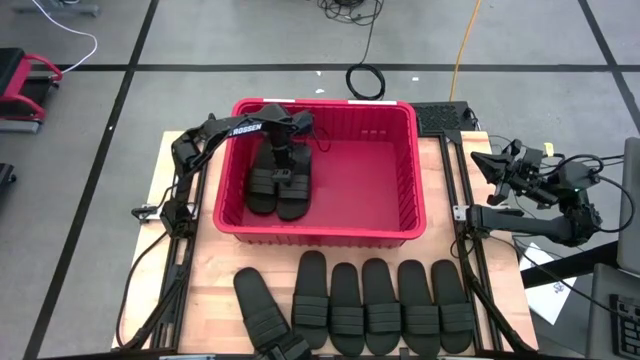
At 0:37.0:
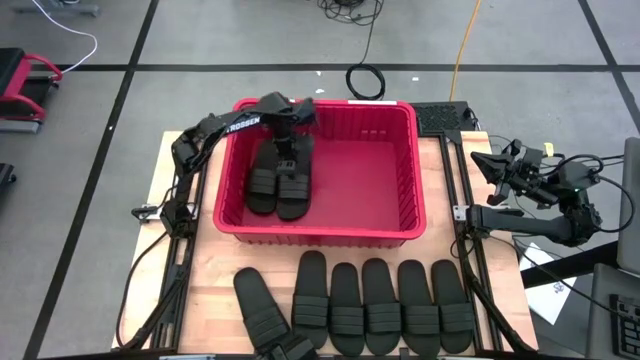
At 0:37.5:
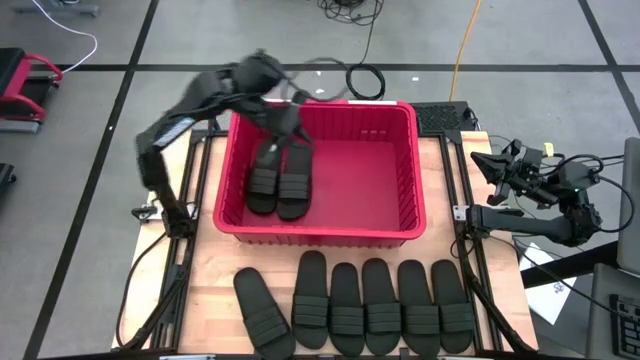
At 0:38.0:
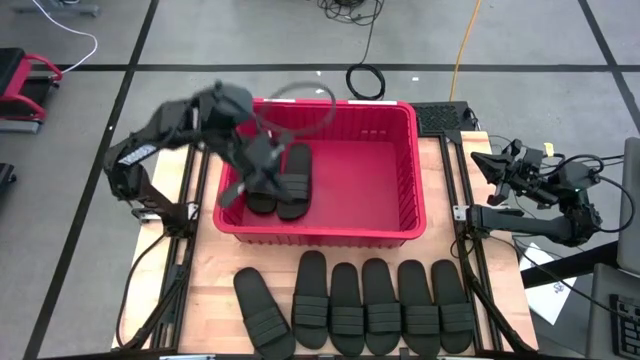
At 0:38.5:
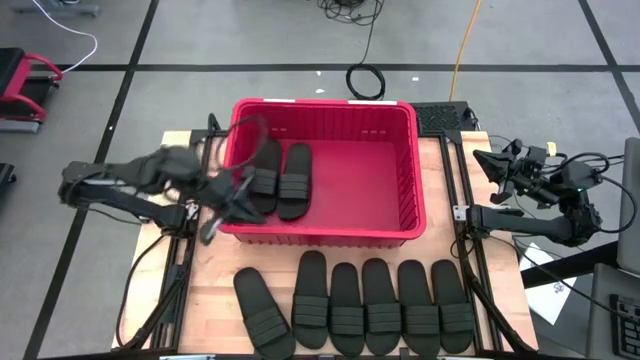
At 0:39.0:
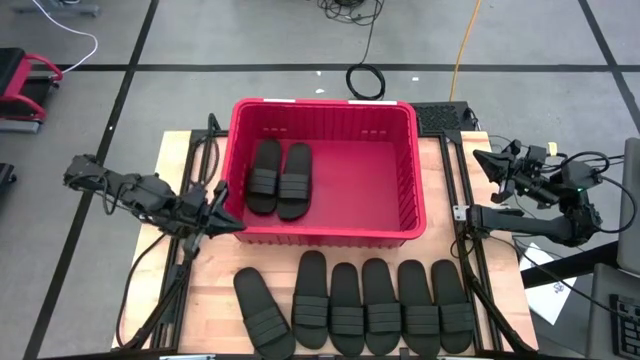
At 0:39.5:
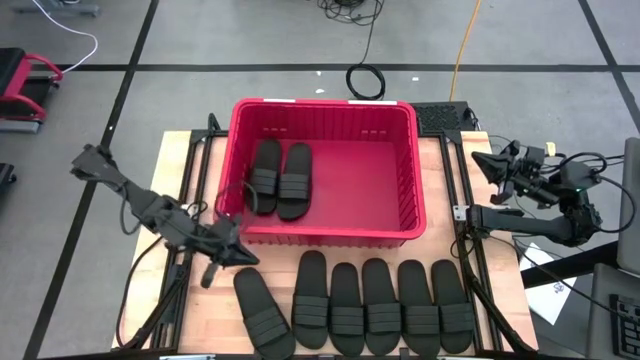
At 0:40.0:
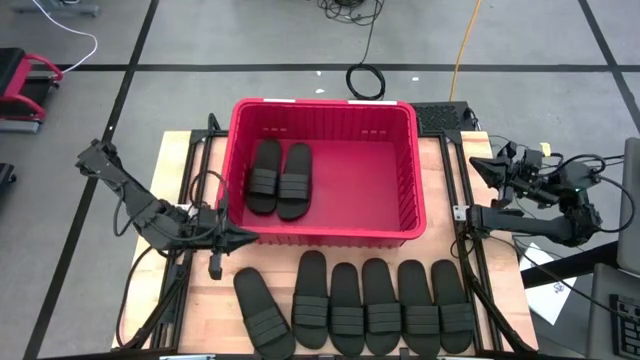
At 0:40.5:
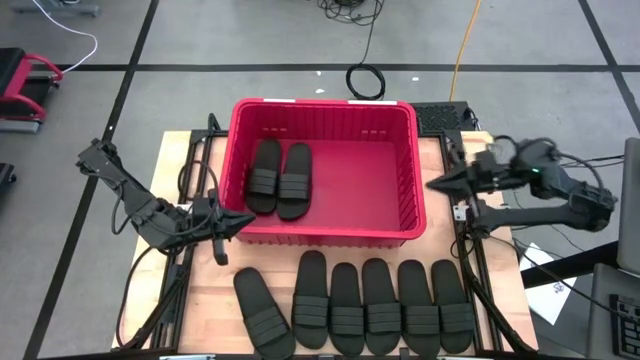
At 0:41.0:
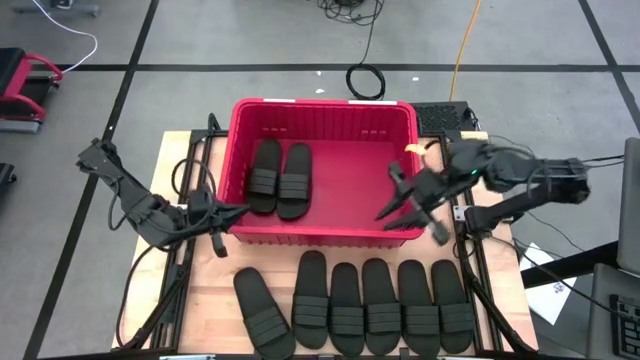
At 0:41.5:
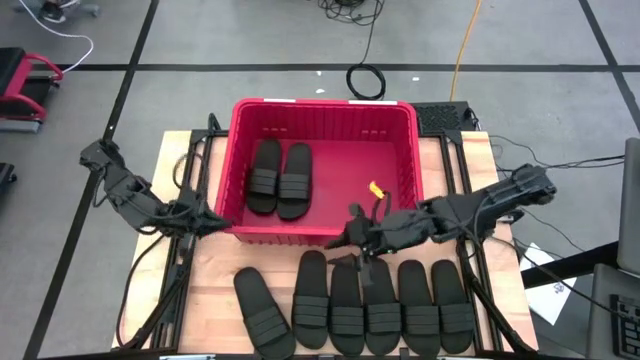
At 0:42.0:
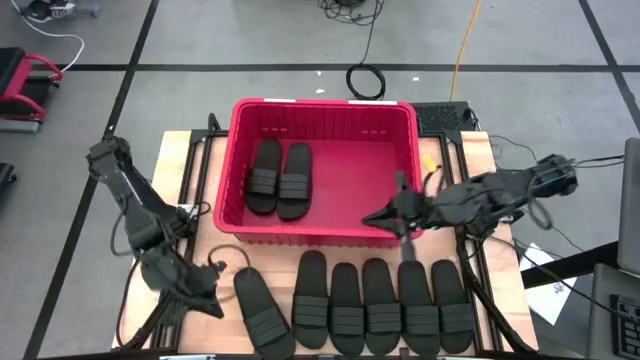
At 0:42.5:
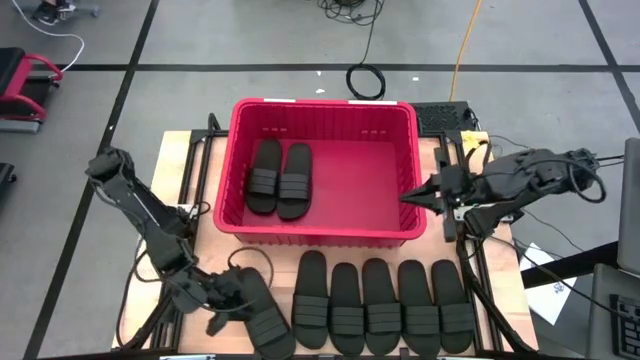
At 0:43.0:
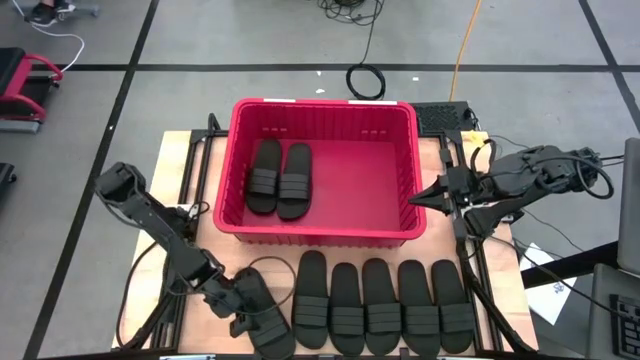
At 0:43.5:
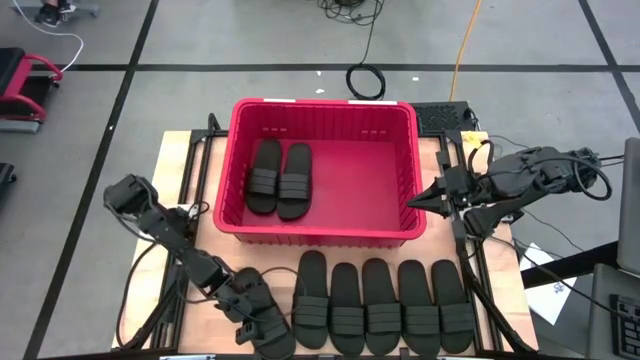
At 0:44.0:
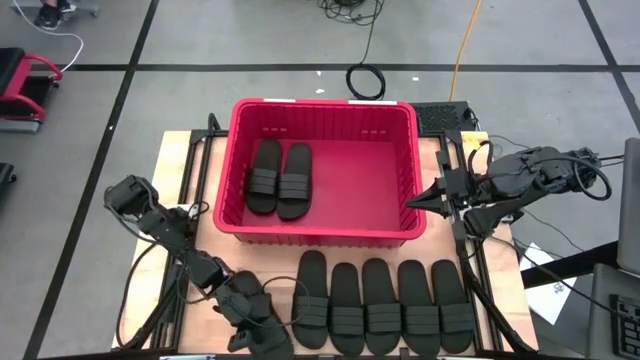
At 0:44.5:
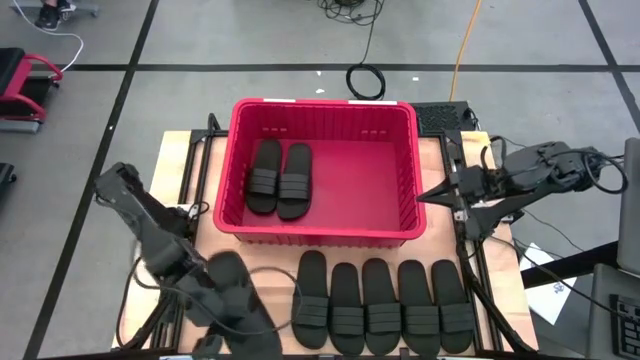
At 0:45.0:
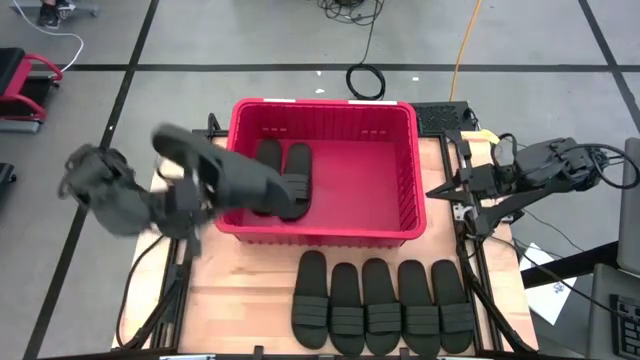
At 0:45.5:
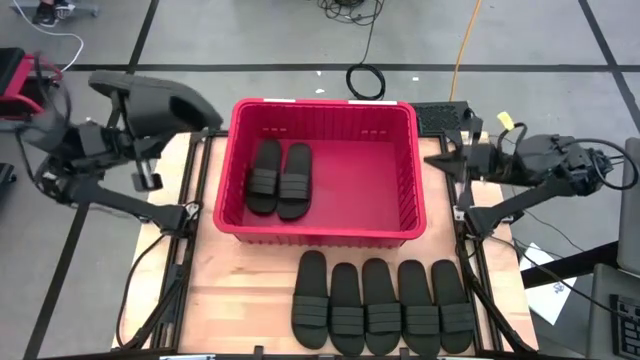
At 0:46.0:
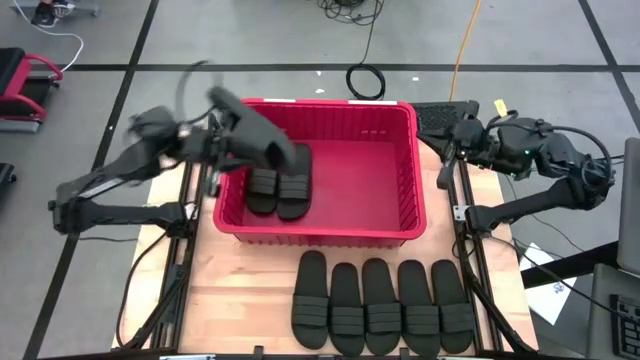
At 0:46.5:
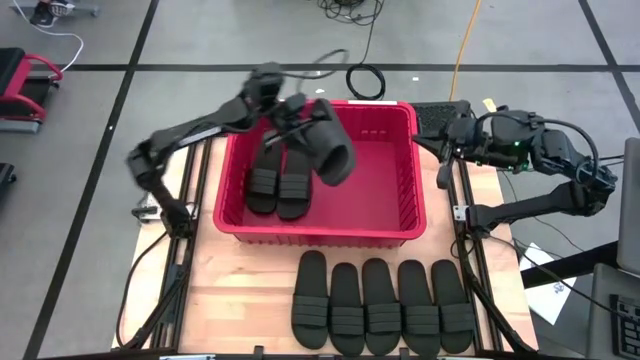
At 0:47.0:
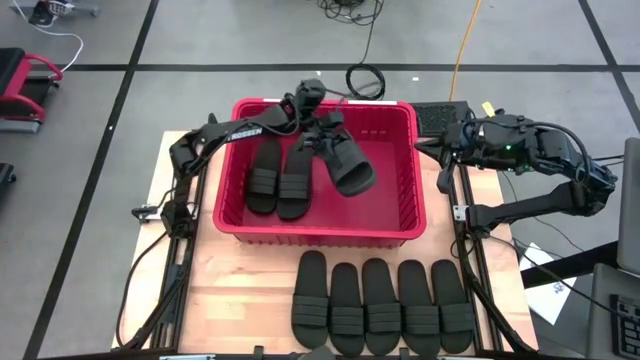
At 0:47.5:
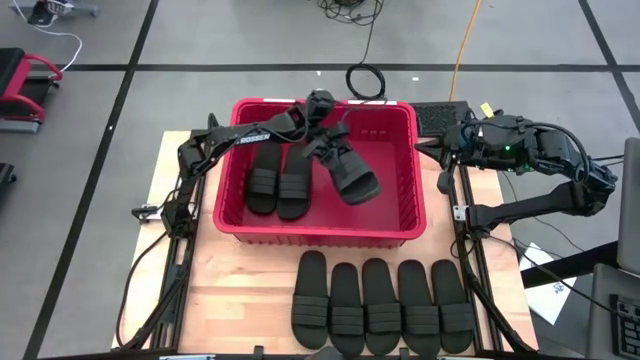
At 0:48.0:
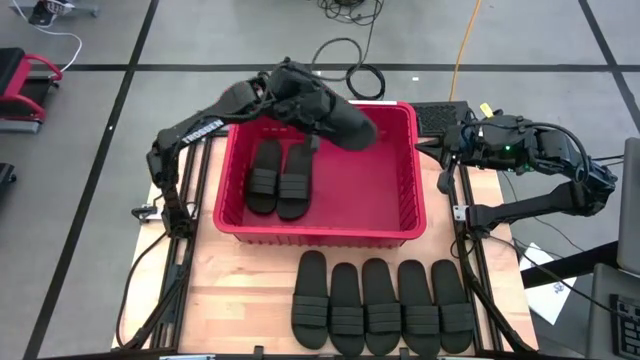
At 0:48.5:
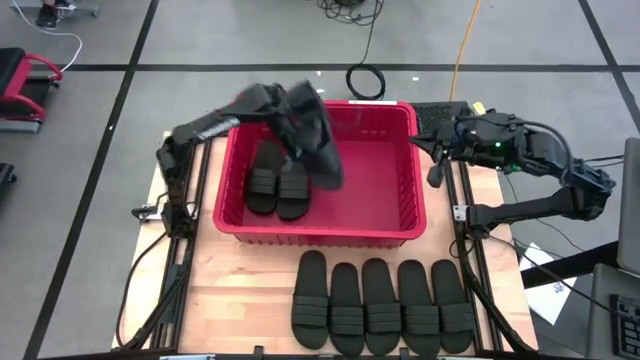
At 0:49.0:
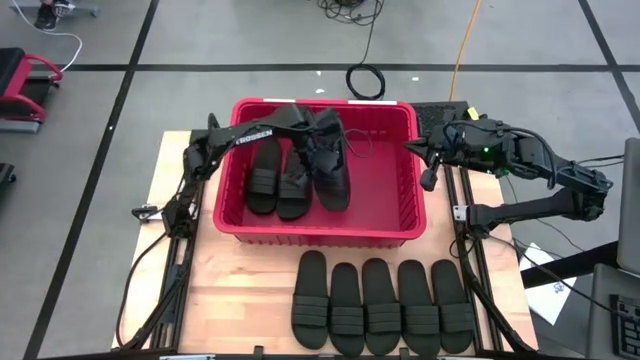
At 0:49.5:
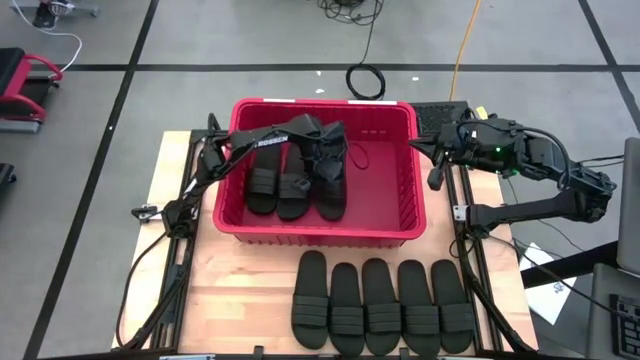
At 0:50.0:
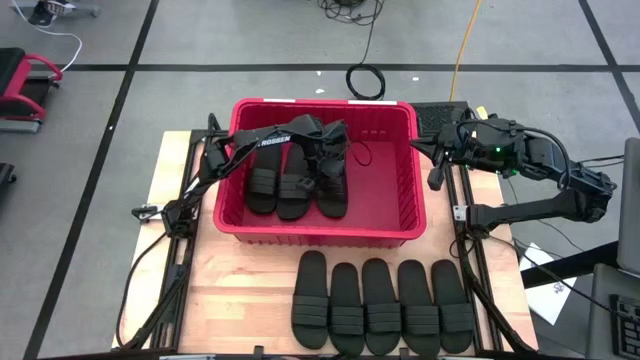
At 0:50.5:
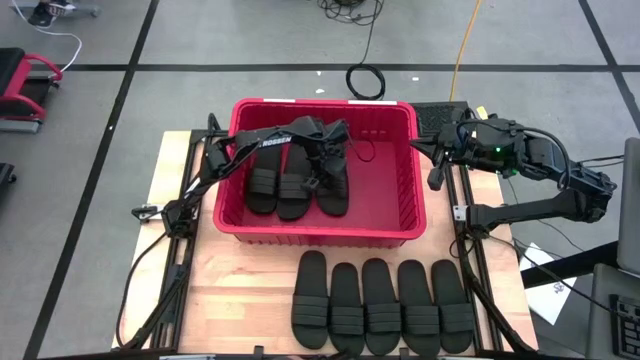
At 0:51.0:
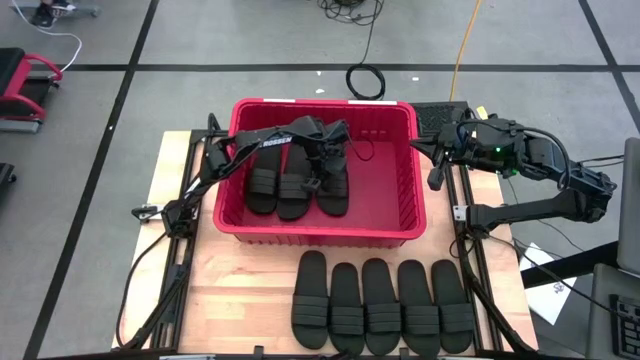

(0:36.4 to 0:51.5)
Task: Pick and place slides into bin
Put the black slide into the red bin

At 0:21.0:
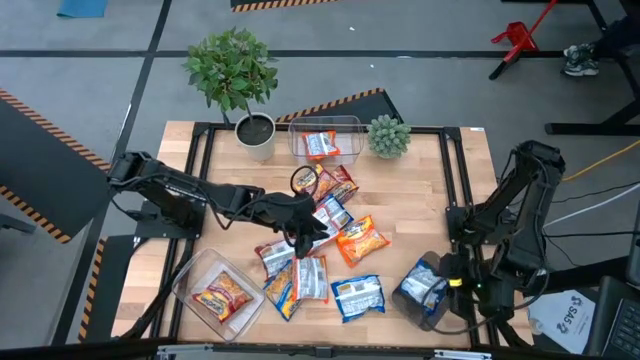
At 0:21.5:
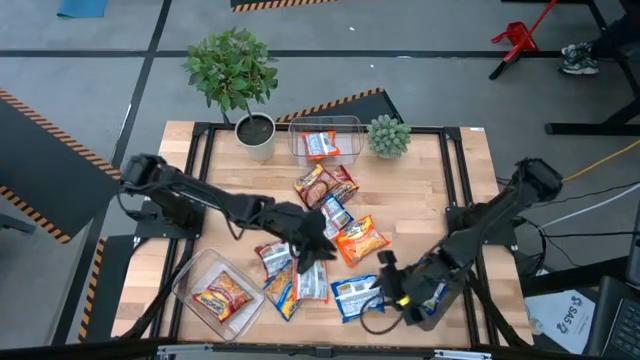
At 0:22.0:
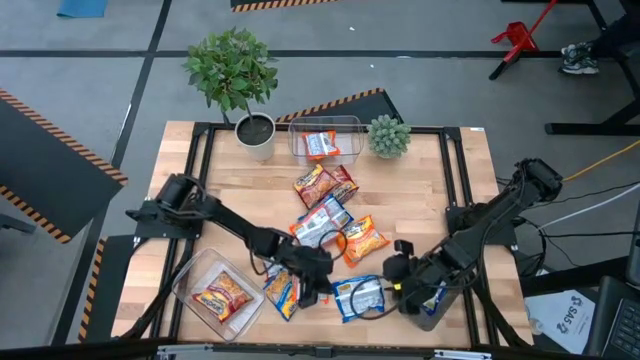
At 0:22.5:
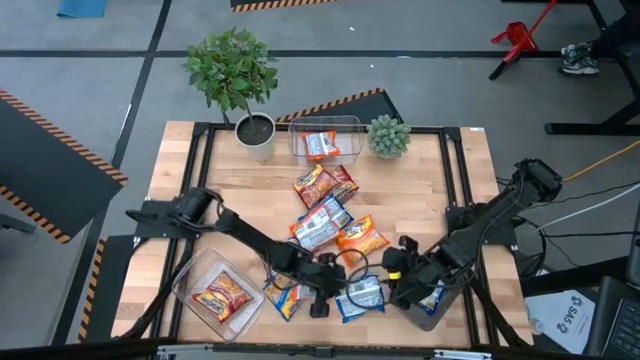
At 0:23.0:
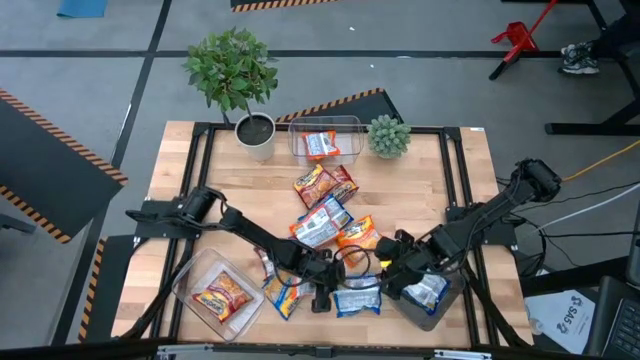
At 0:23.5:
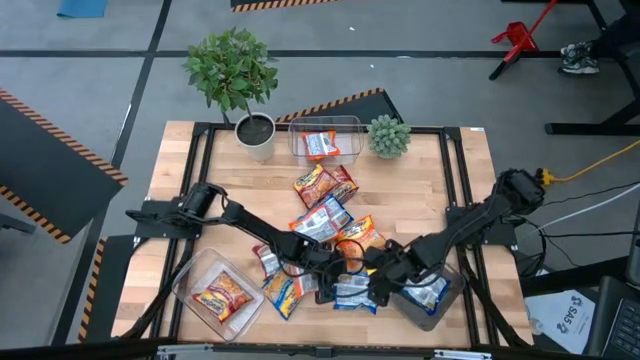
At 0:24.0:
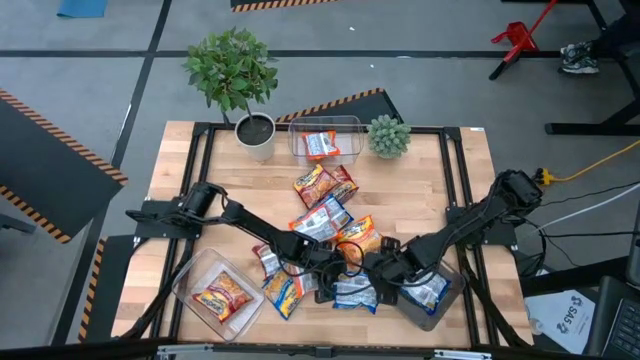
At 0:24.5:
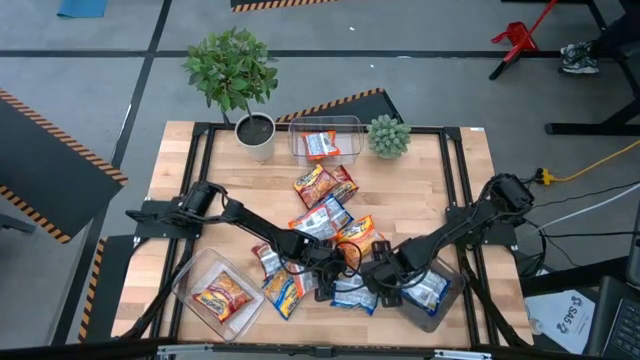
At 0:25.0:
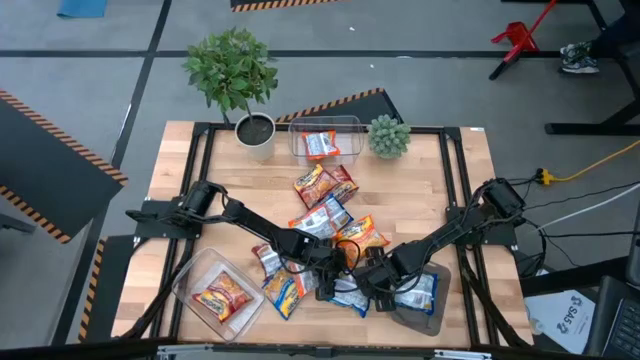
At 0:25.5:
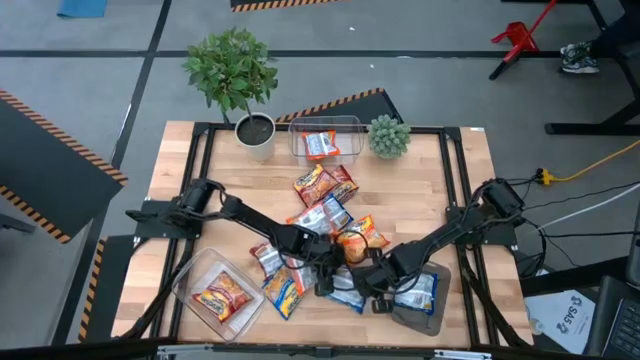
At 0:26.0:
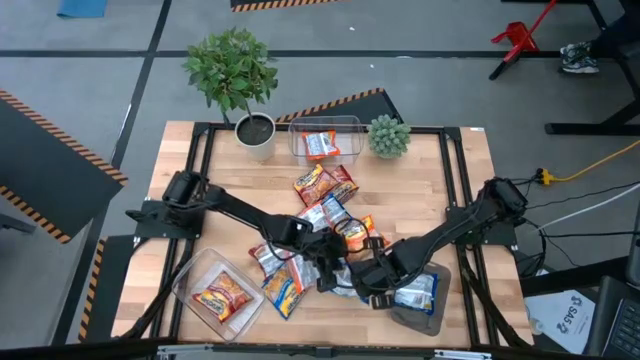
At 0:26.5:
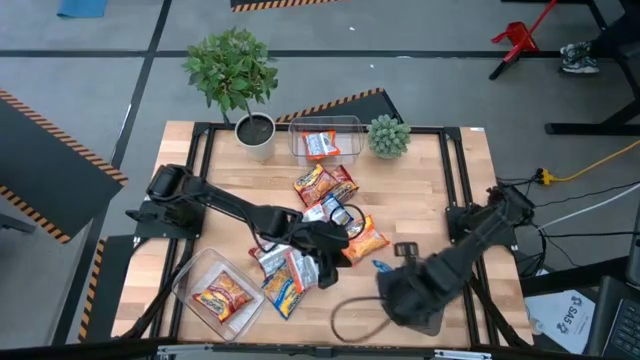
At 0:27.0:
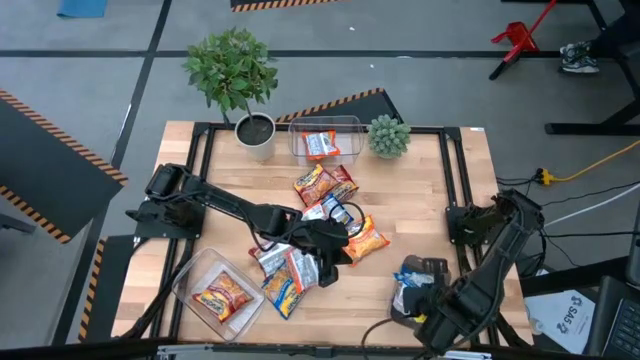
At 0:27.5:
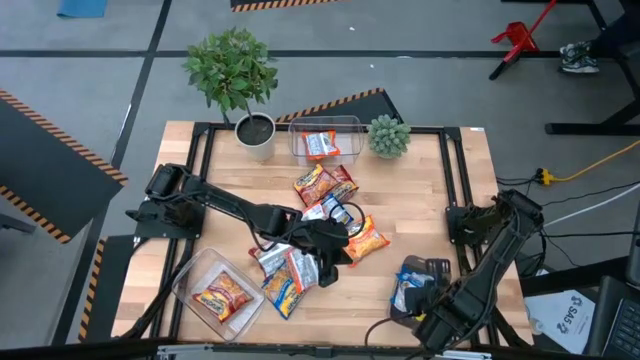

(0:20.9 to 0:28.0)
Task: Sort Maruchan noodles
Put the blue noodle pack into the black bin
